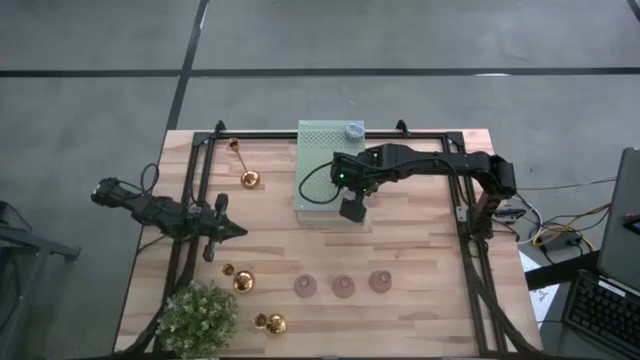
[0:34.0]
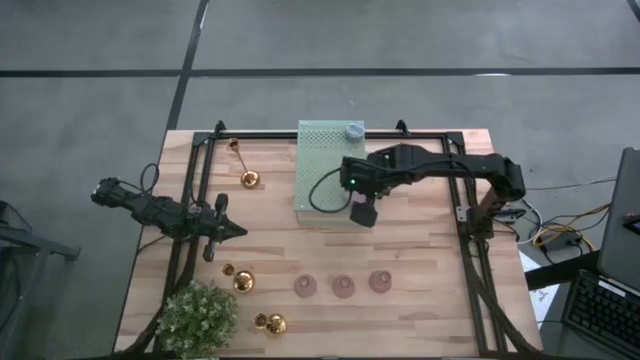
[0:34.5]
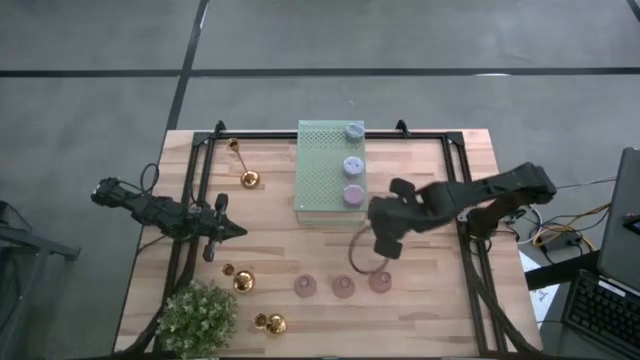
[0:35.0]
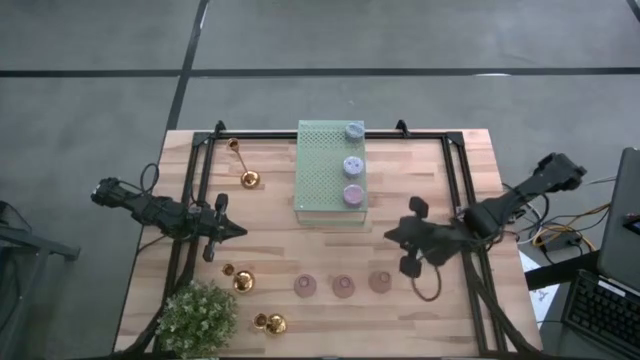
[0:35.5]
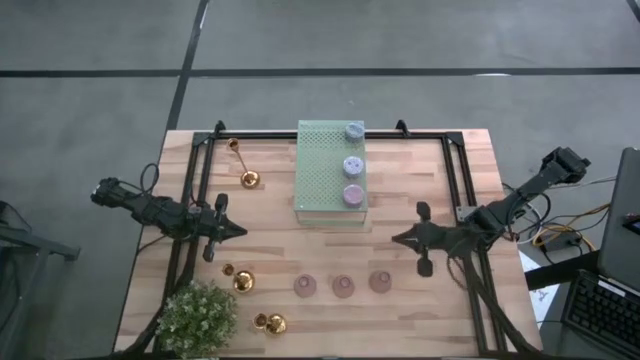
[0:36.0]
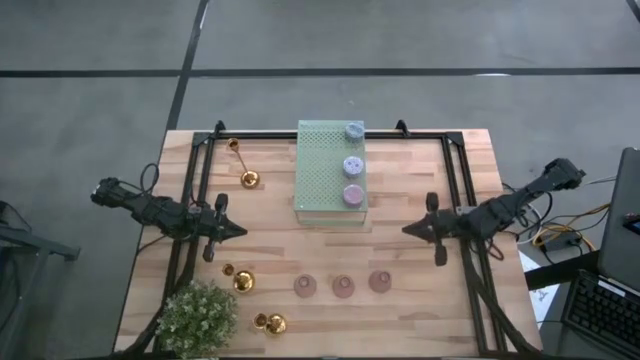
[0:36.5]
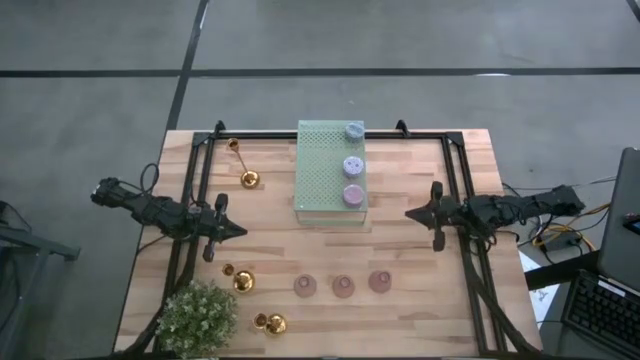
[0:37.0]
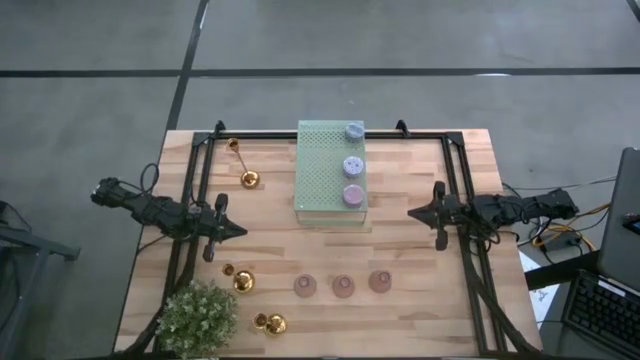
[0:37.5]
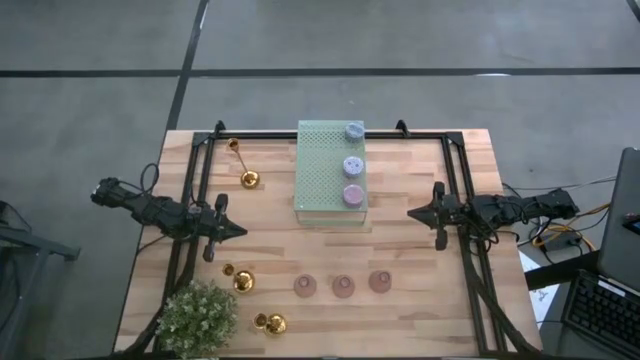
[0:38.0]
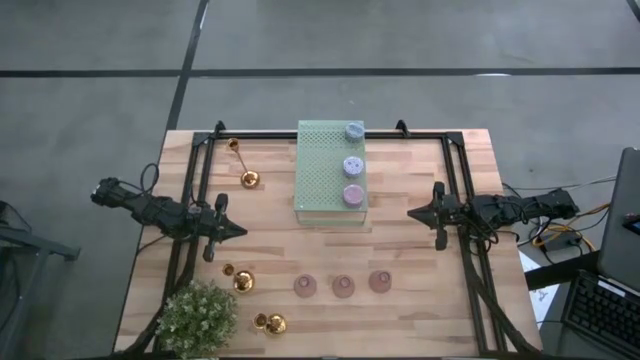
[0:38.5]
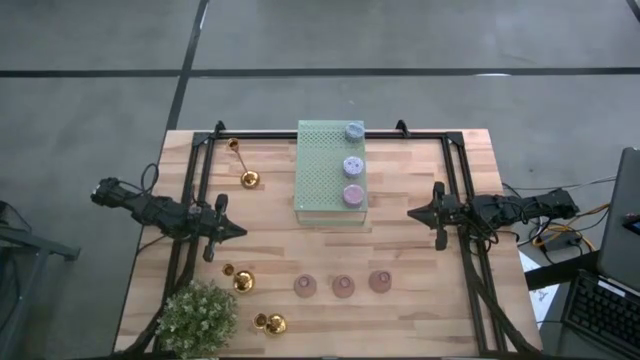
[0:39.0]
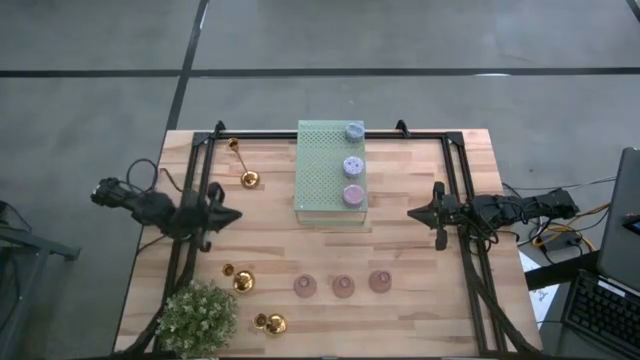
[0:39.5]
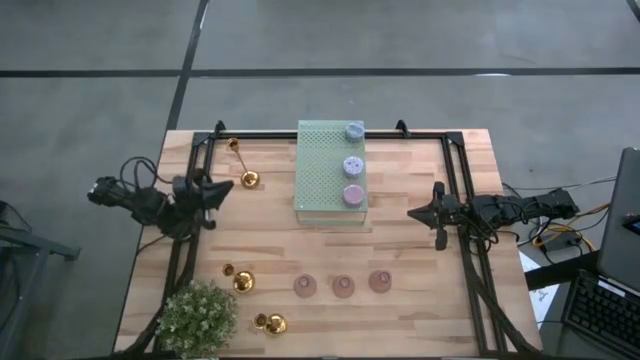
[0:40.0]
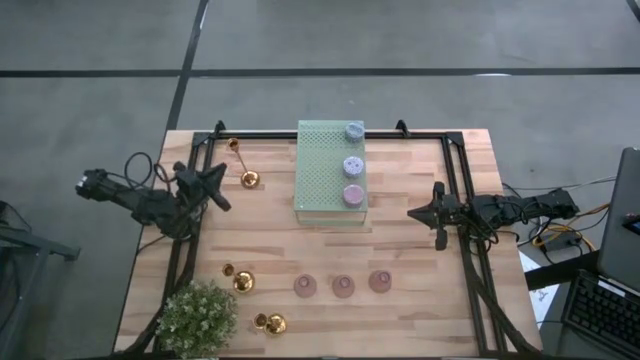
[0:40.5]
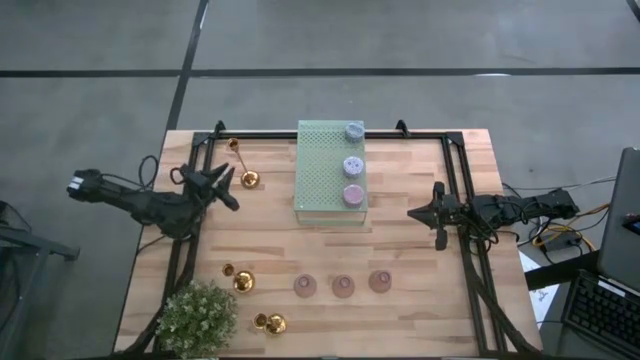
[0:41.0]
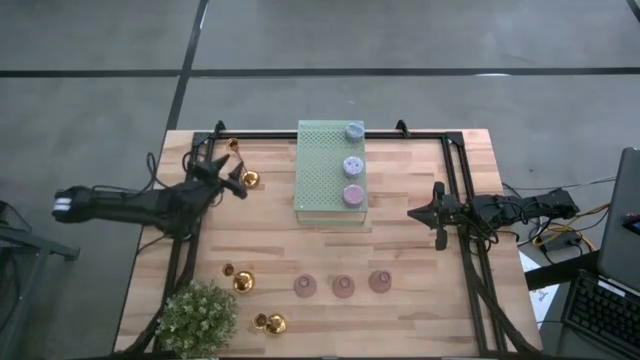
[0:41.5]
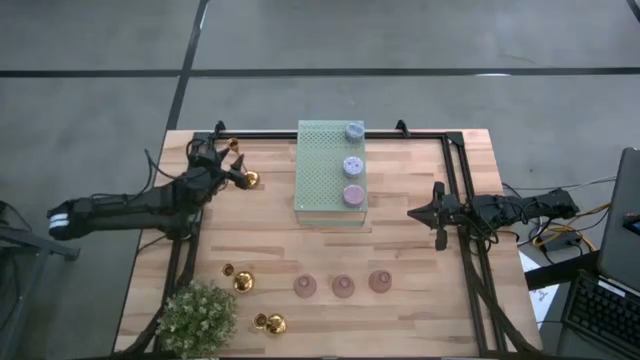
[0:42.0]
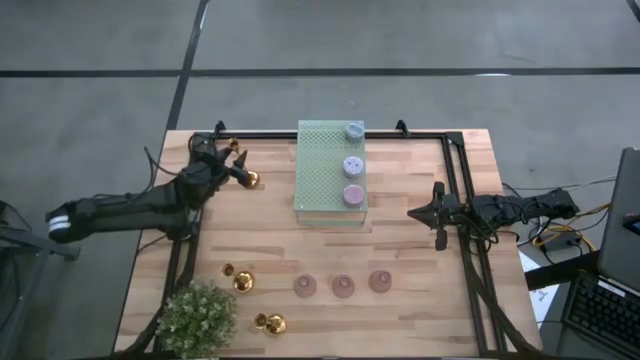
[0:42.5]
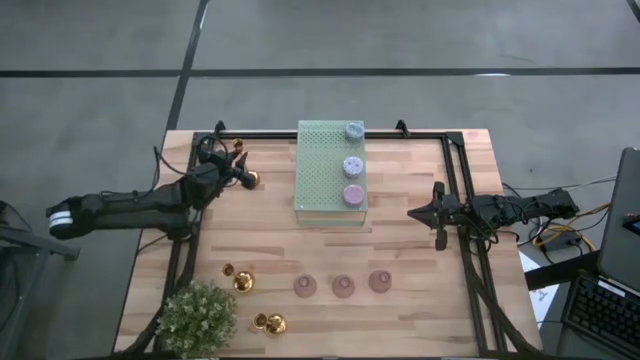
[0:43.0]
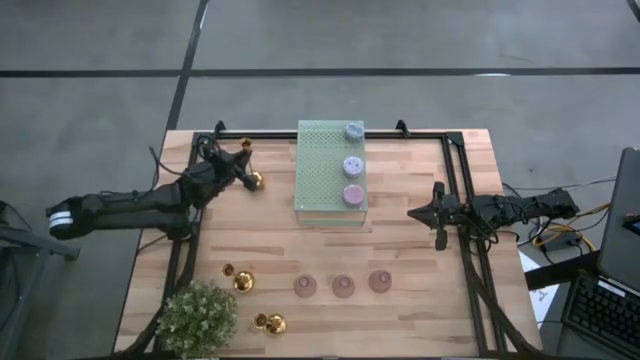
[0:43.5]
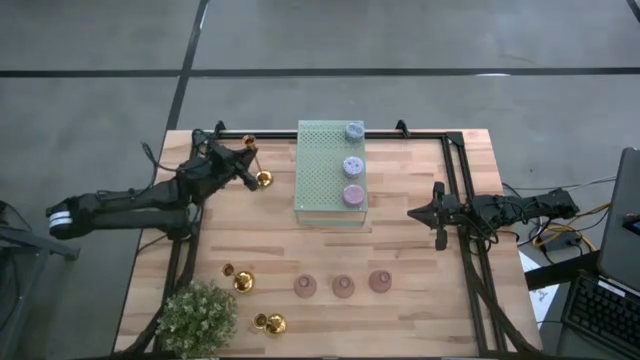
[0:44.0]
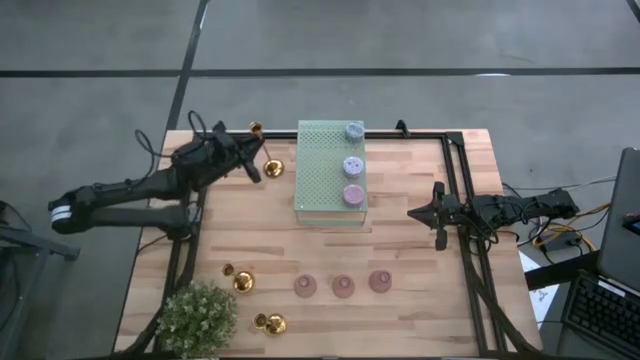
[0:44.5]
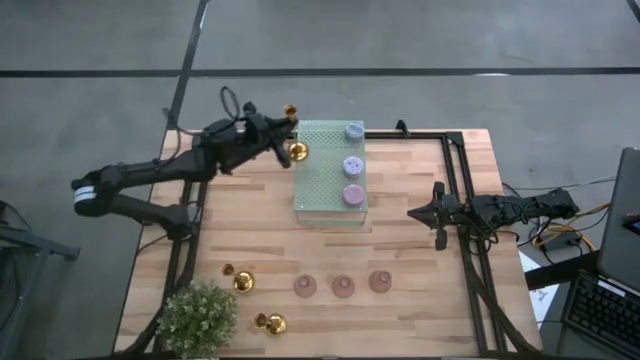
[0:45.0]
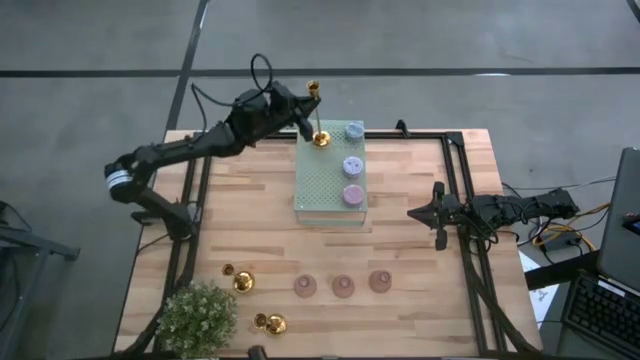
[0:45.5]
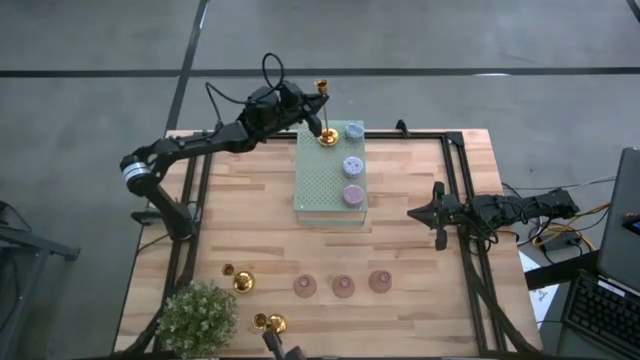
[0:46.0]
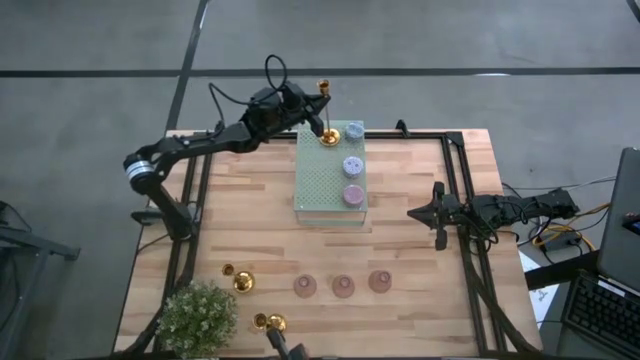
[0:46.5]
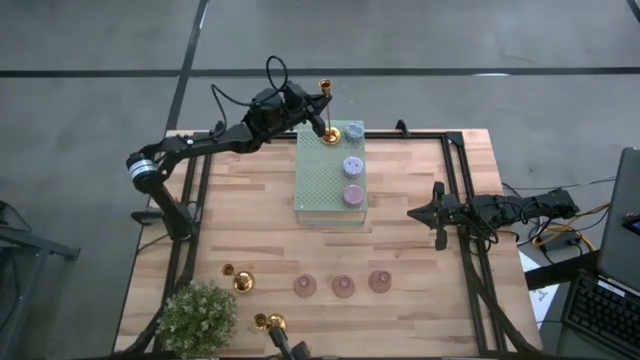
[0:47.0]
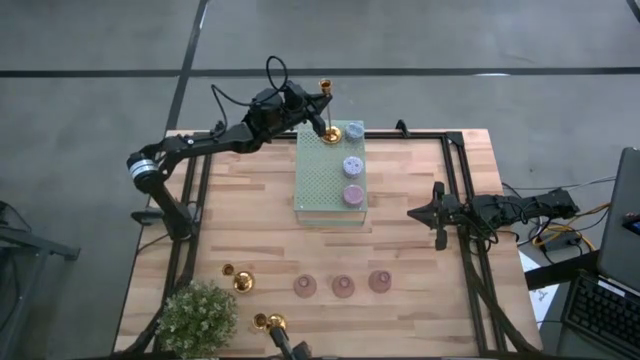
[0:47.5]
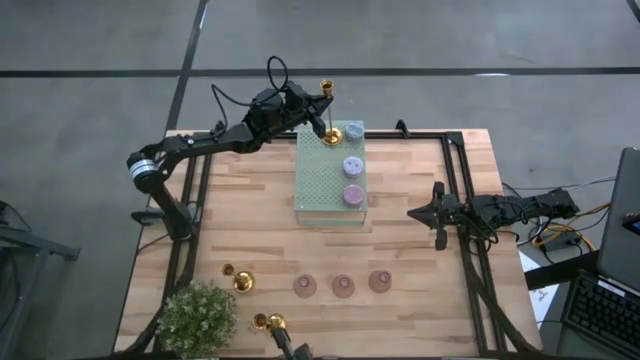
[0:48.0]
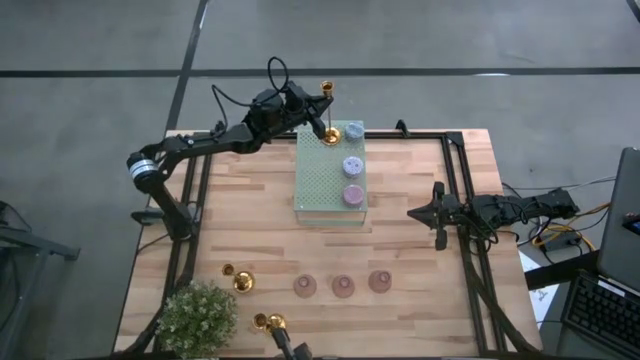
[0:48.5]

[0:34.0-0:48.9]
Task: Pick & Place candle stick holders
Put the top gold candle holder on the shelf

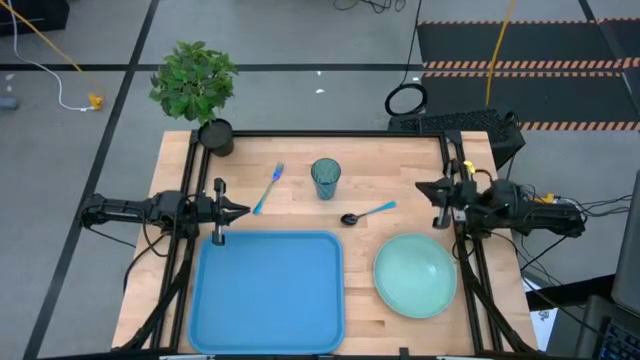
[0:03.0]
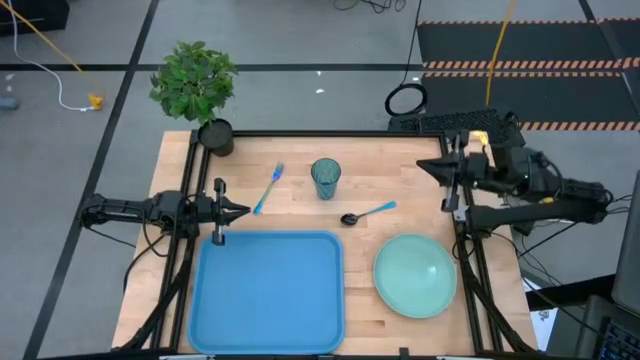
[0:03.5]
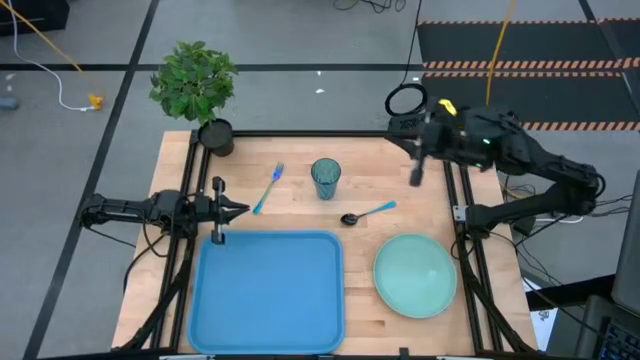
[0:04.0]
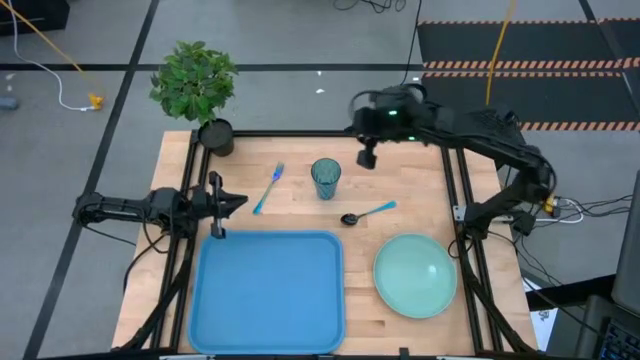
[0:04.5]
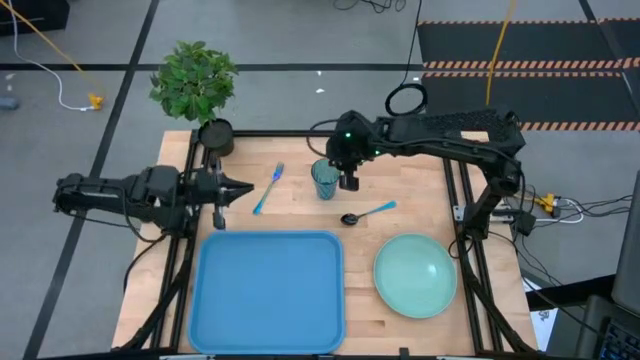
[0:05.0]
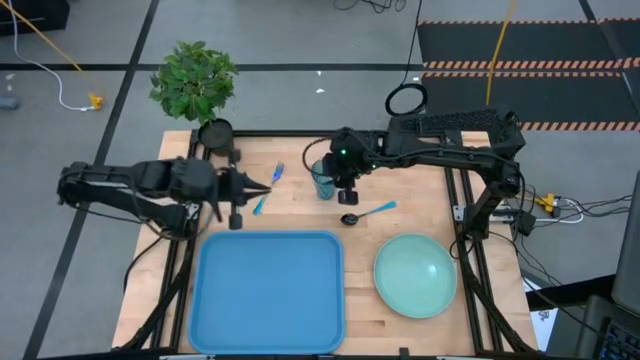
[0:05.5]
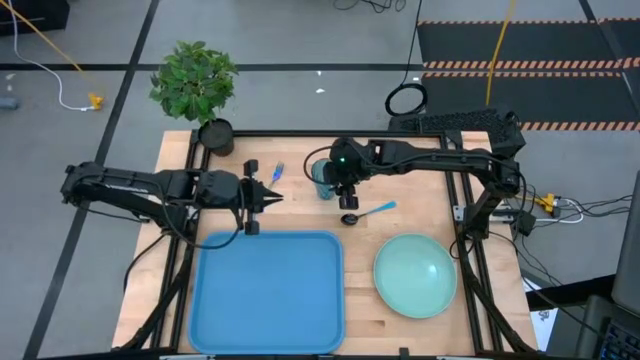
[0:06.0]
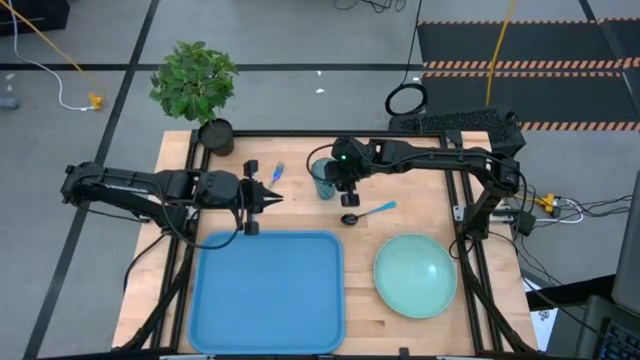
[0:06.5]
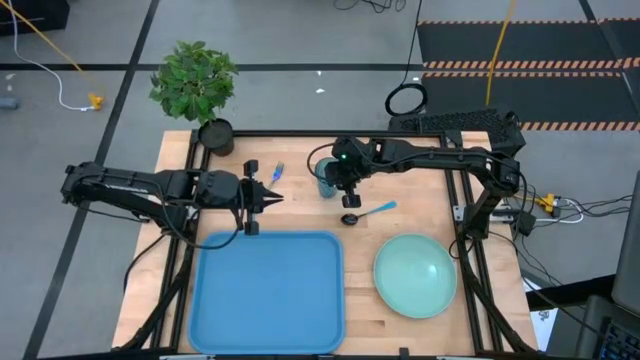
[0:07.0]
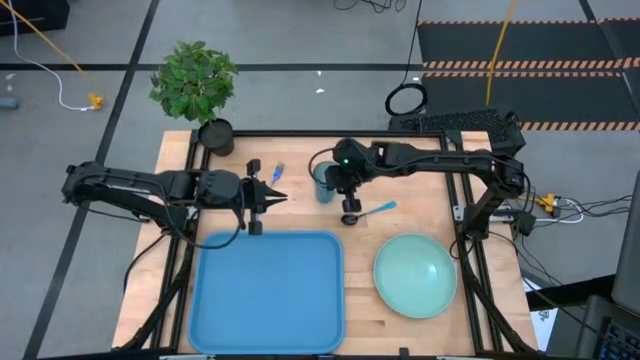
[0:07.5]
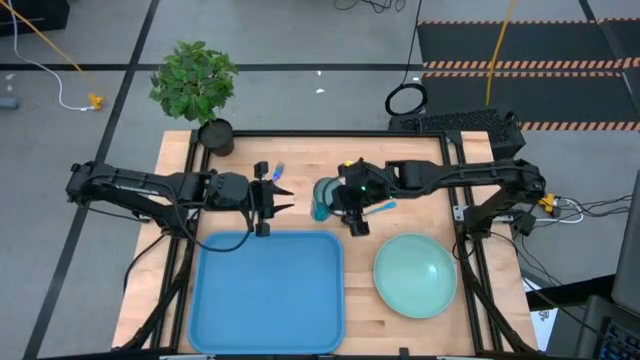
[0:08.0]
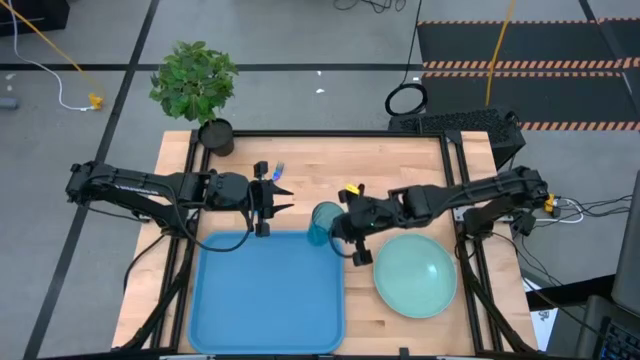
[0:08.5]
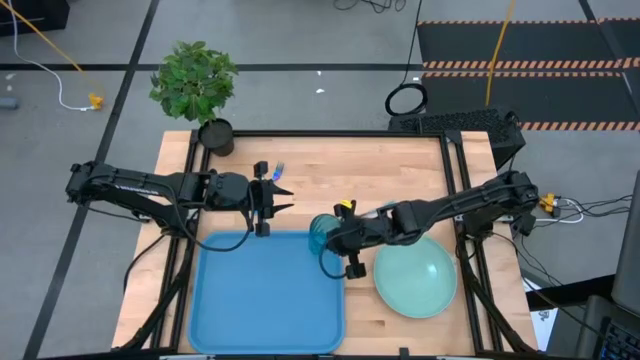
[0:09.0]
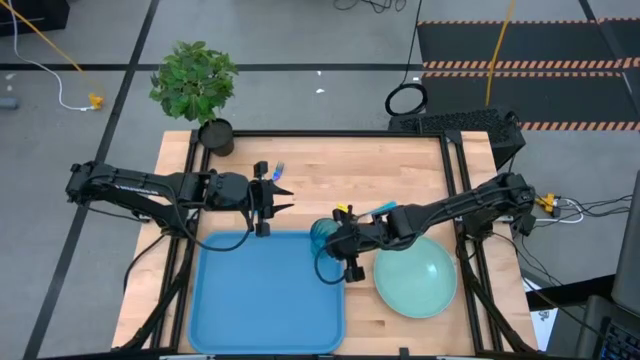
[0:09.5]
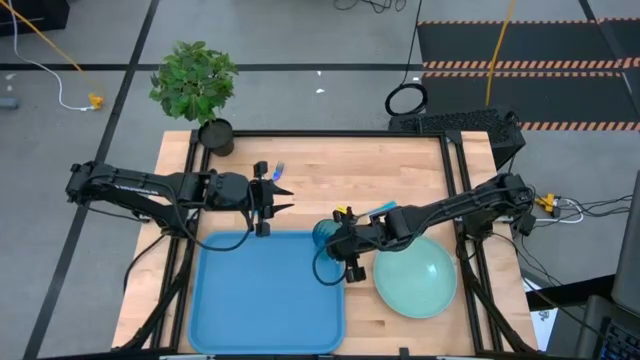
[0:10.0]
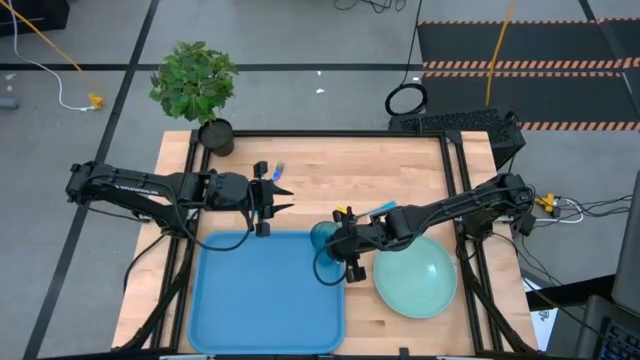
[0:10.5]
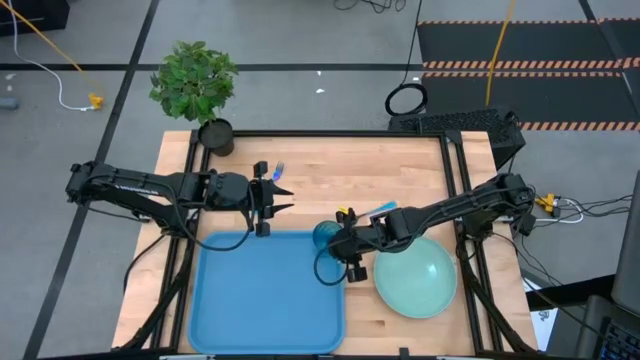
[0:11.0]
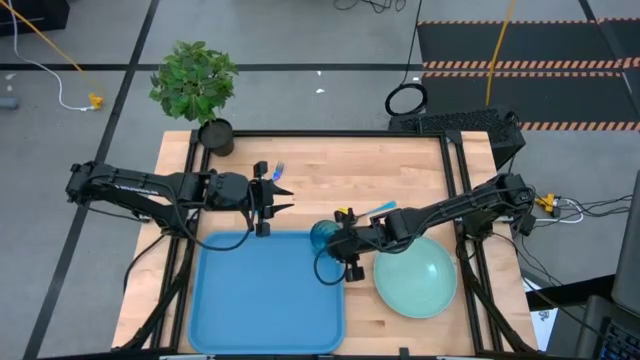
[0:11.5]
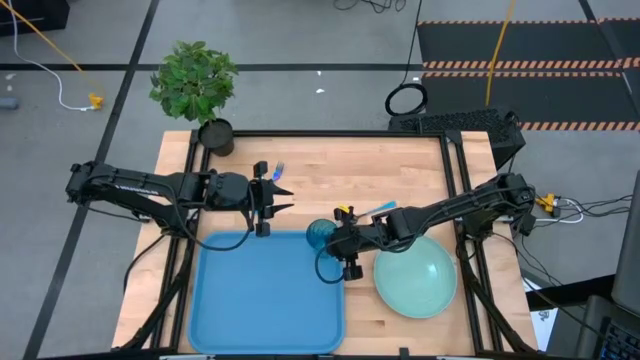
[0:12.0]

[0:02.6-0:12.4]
Task: Pick and place plate/cup/fork/spoon on tray
Put the blue glass on the blue tray
